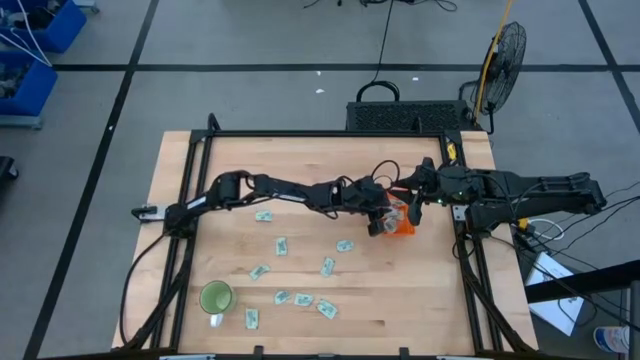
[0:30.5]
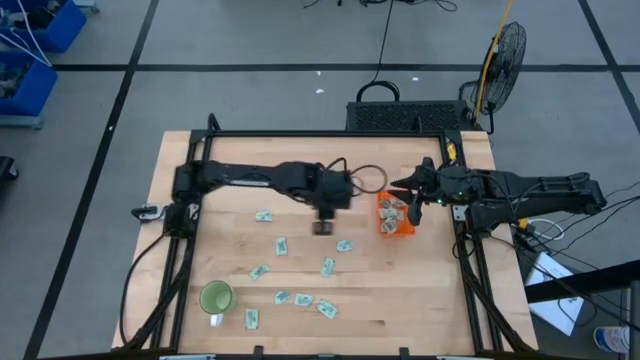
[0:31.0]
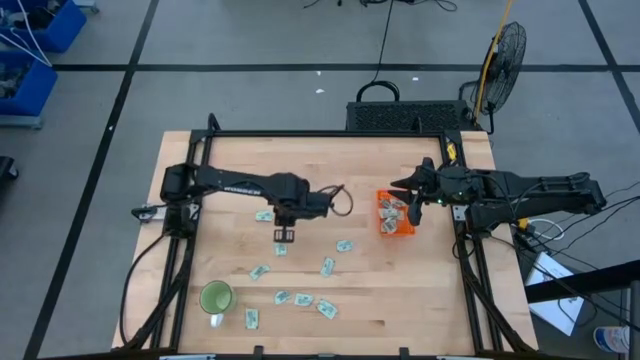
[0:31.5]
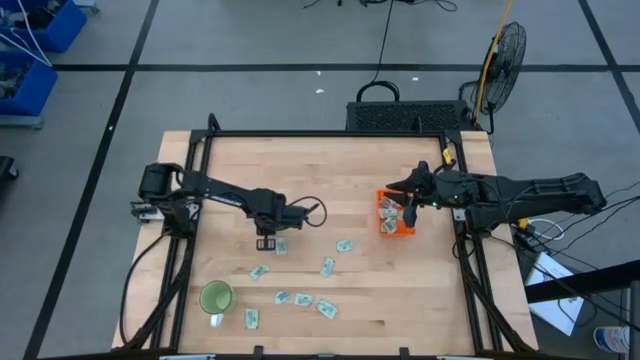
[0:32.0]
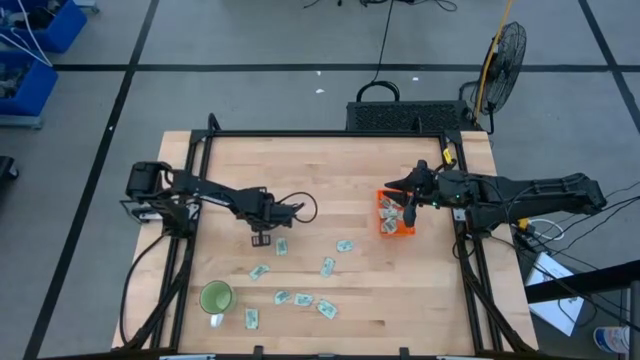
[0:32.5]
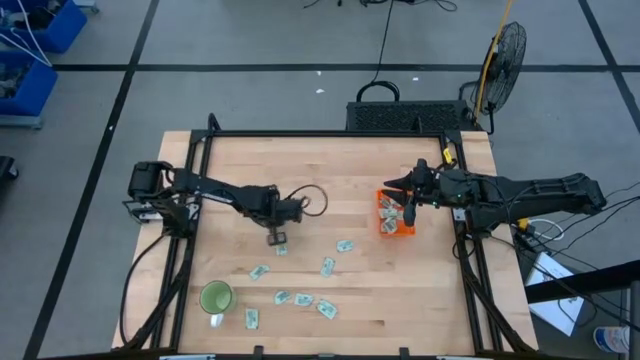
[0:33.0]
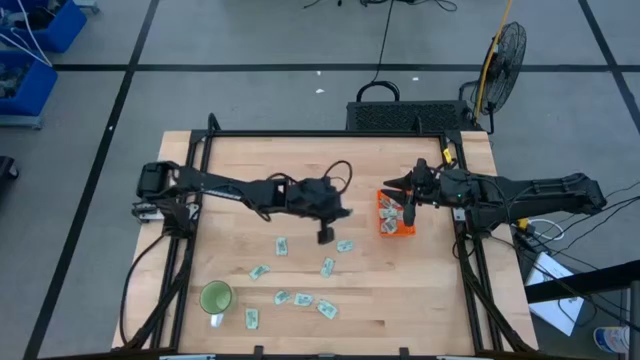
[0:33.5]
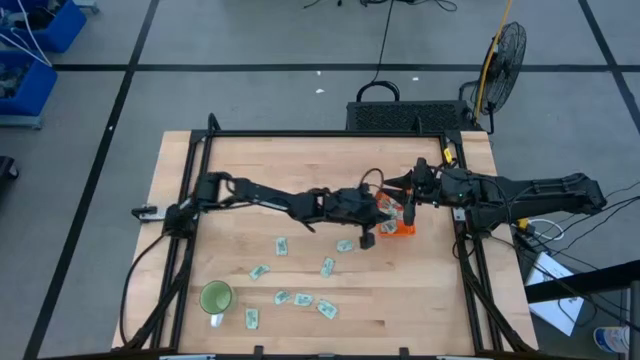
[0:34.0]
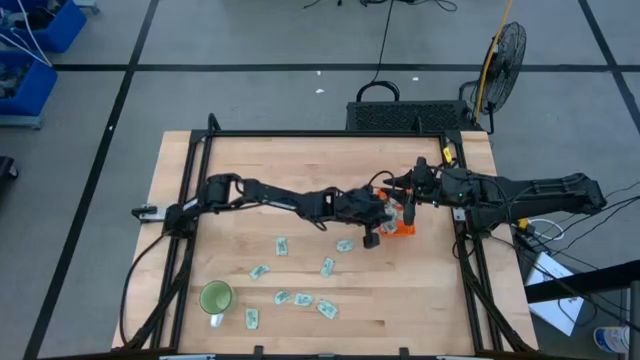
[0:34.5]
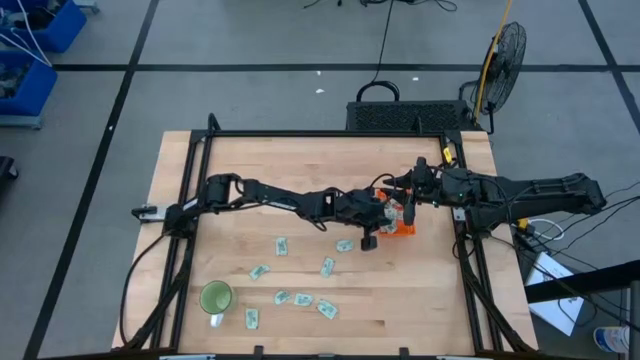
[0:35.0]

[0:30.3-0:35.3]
Task: Pick and place Stevia / Truvia into bins
Put the stevia packet into the orange basket

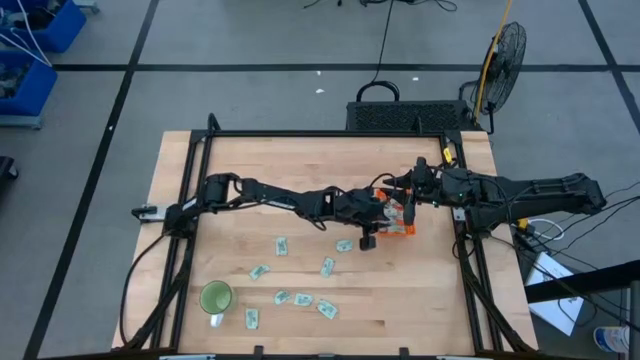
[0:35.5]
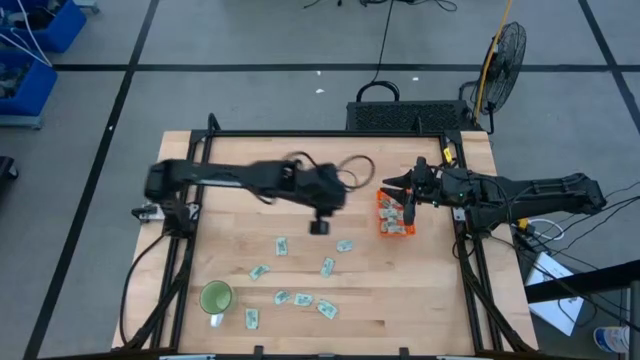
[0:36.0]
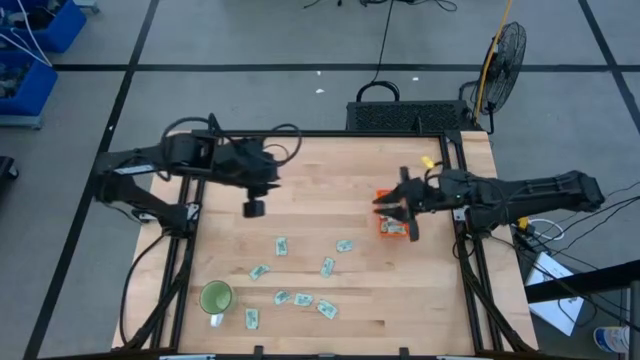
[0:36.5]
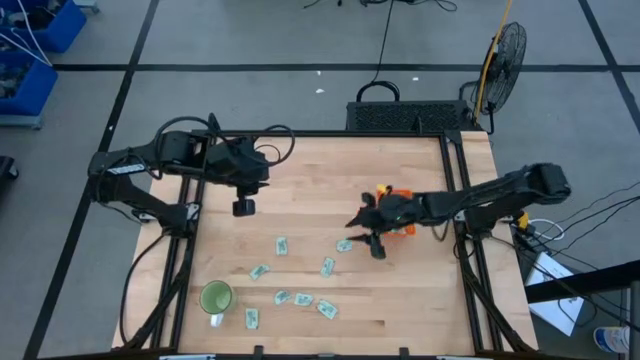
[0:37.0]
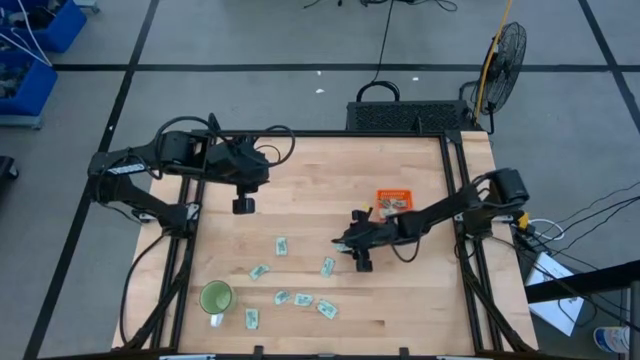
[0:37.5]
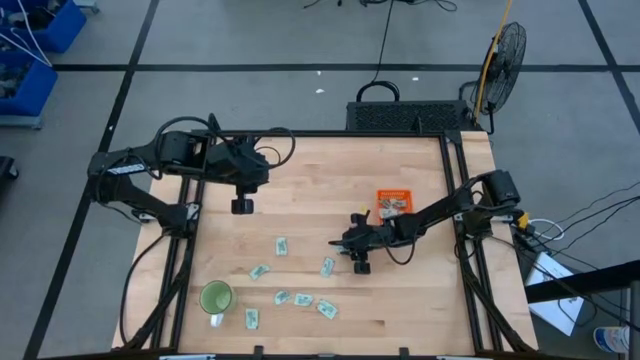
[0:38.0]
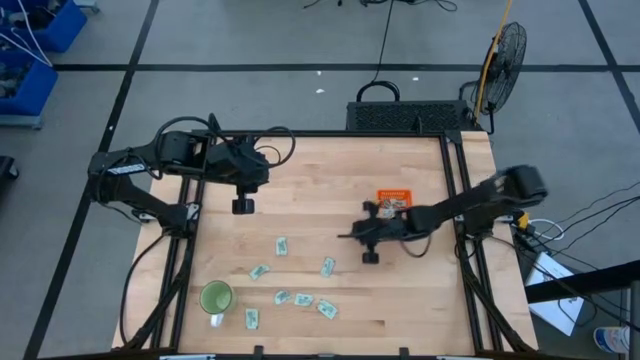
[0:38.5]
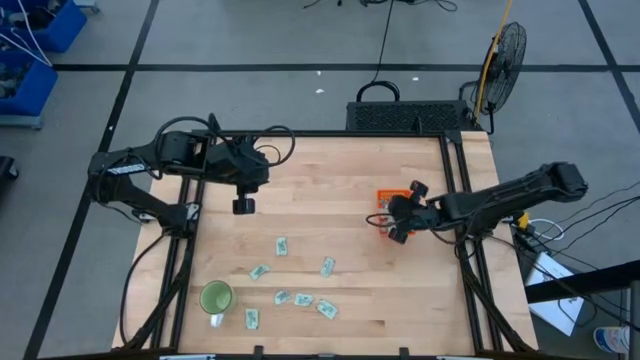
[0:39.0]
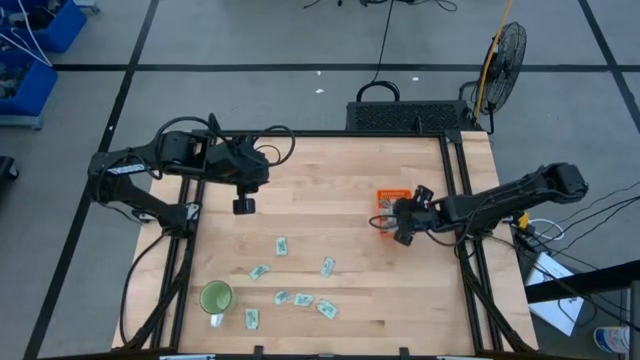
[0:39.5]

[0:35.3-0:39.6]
Put the stevia packet into the orange basket

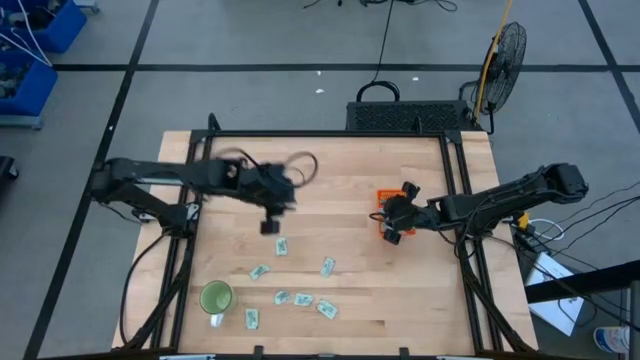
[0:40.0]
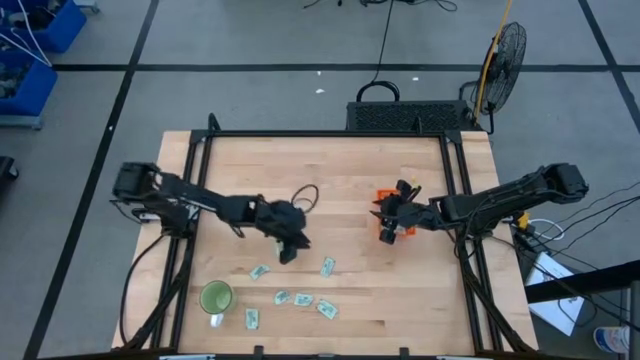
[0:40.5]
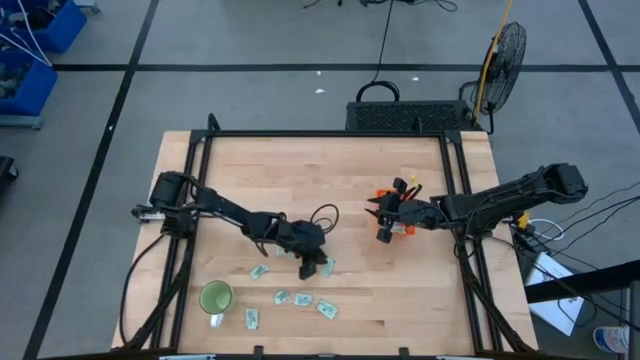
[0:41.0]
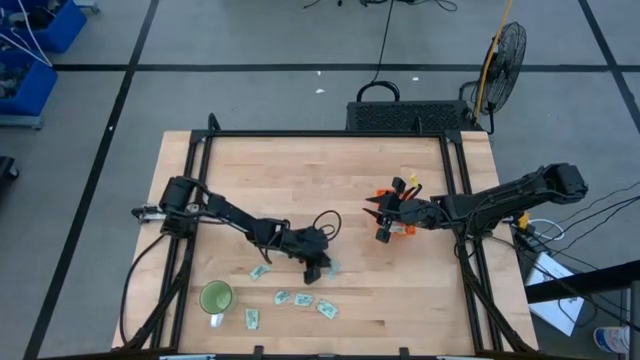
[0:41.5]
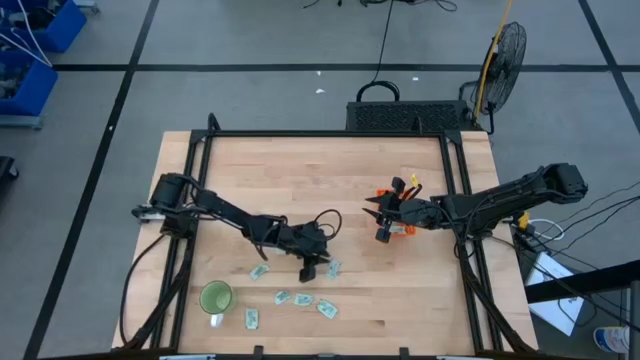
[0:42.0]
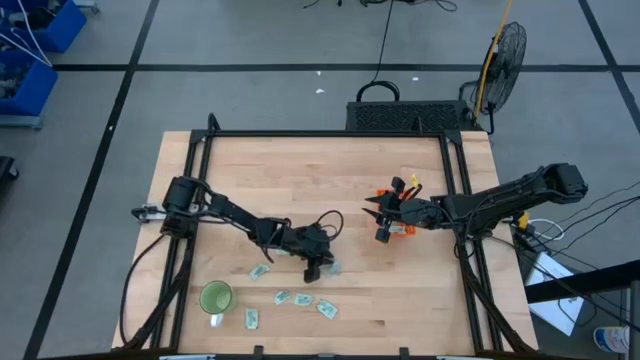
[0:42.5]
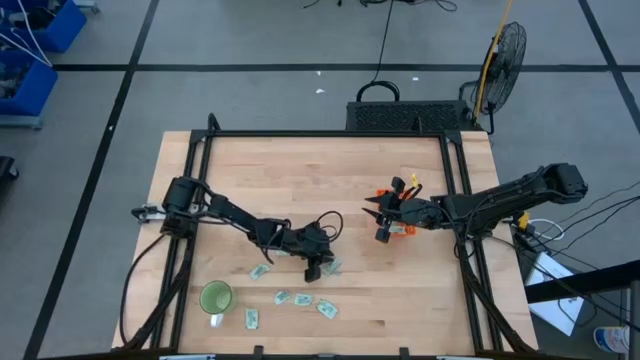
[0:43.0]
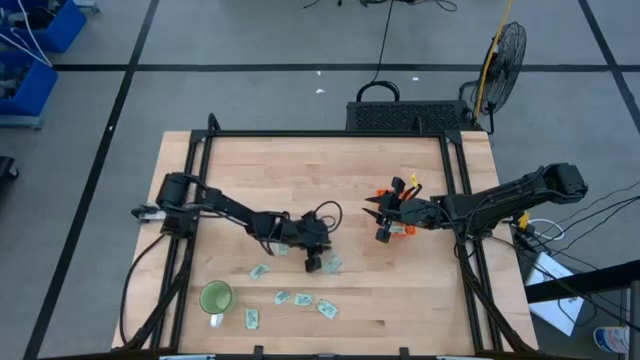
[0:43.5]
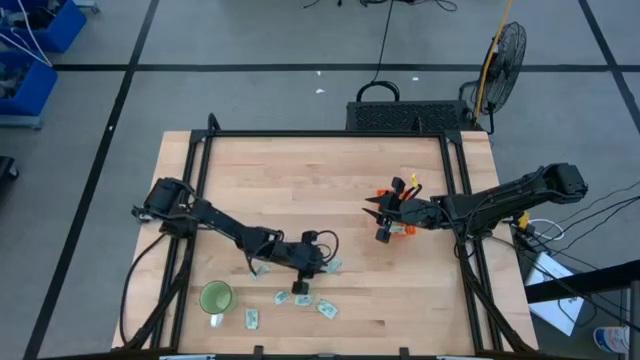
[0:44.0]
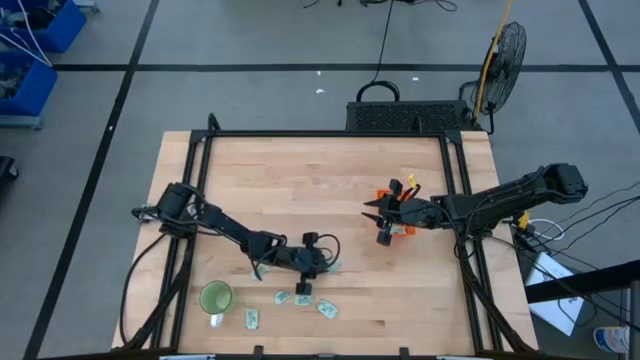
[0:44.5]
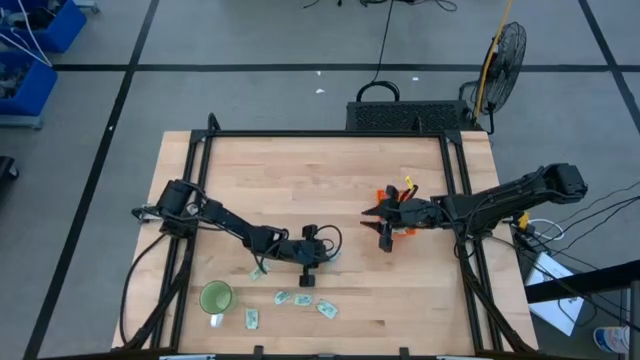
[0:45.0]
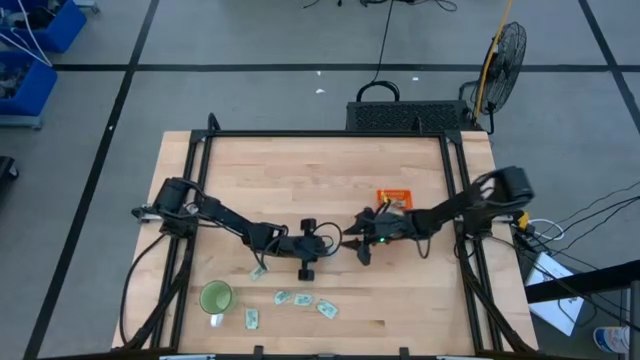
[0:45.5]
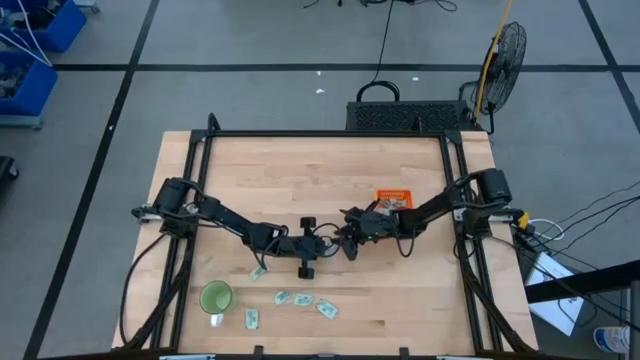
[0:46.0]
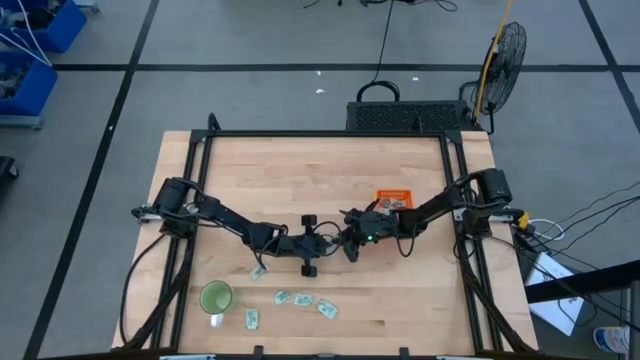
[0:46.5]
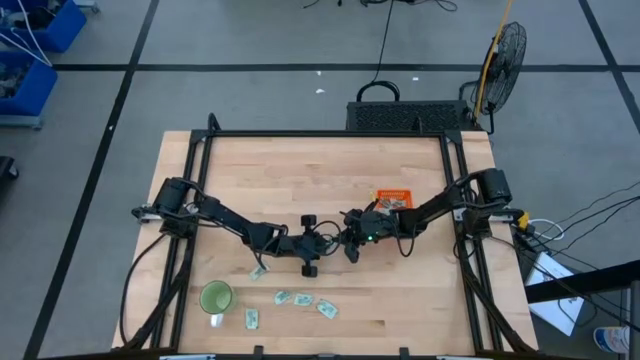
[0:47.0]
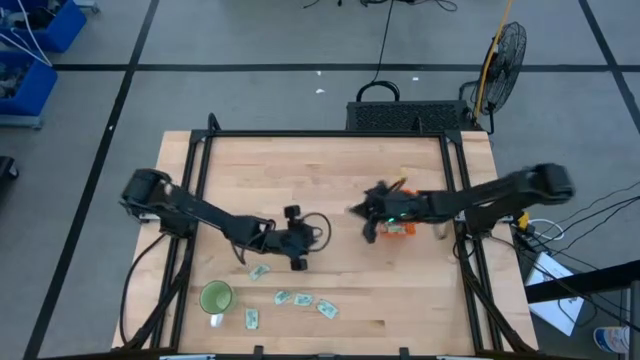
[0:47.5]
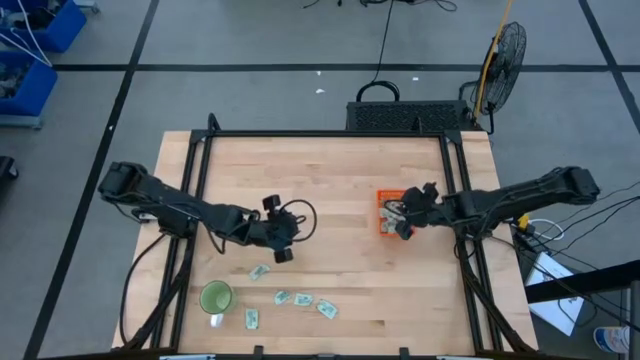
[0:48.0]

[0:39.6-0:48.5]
Put the stevia packet into the orange basket

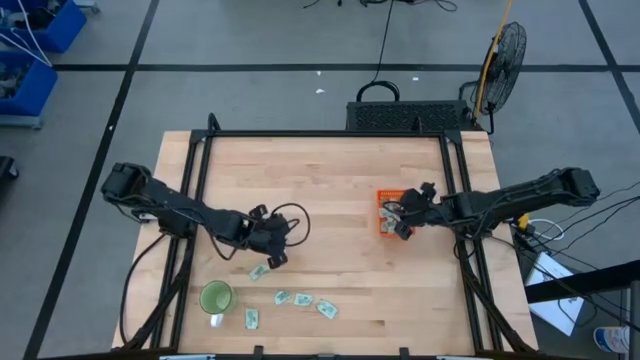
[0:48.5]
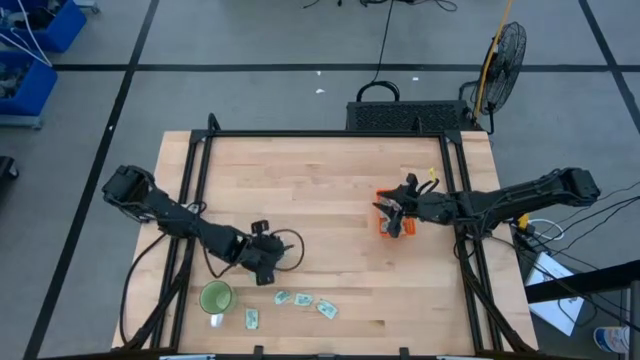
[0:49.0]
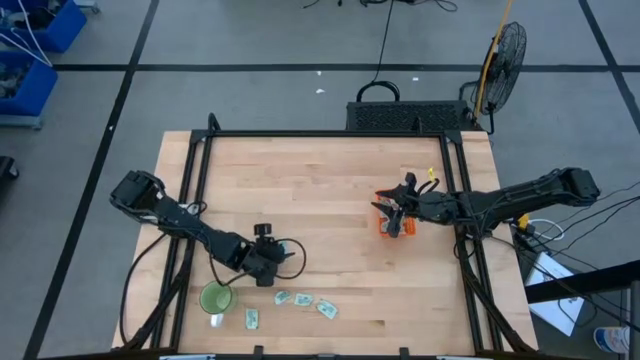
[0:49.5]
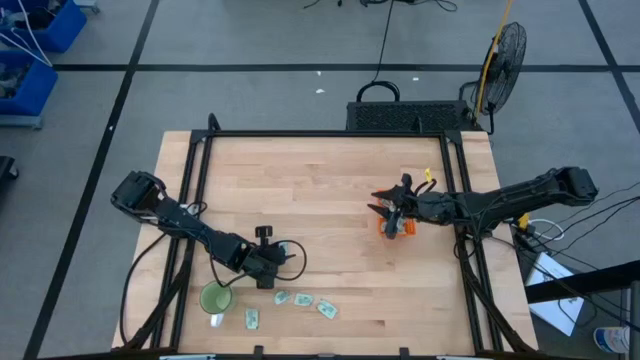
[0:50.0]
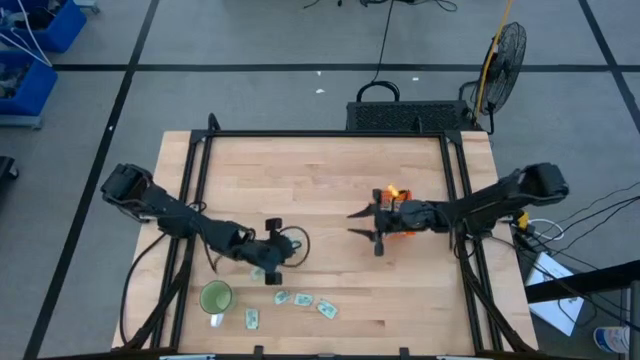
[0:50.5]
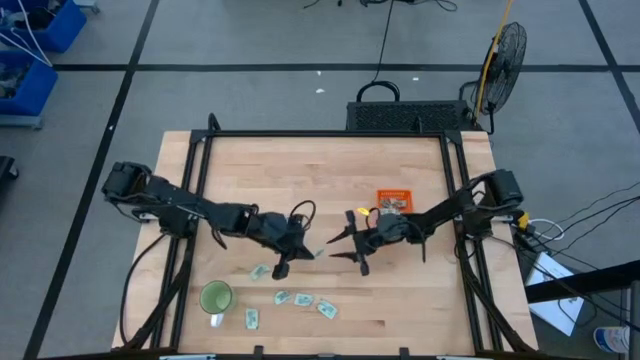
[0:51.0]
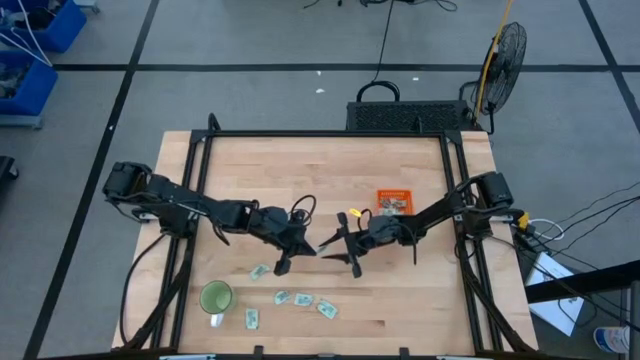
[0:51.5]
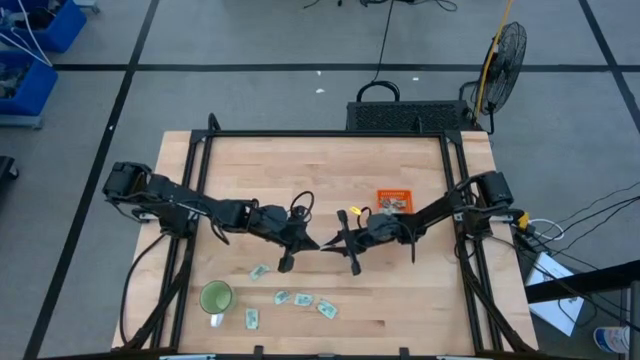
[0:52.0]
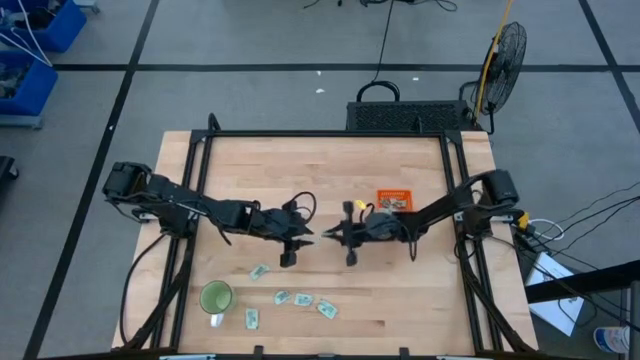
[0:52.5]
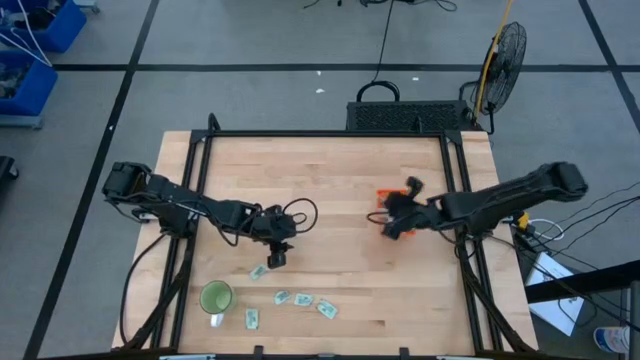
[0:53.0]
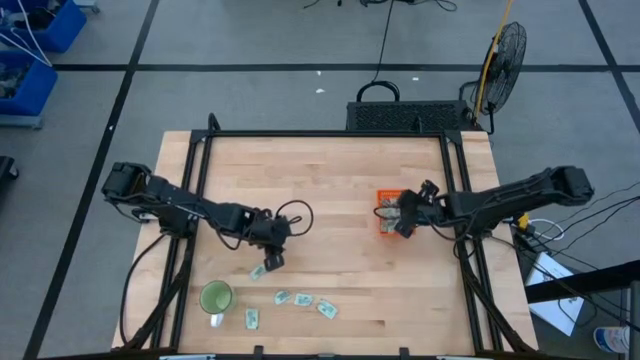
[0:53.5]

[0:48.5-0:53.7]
Put the stevia packet into the orange basket
